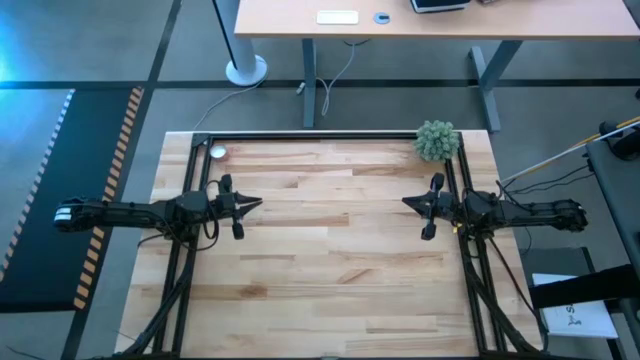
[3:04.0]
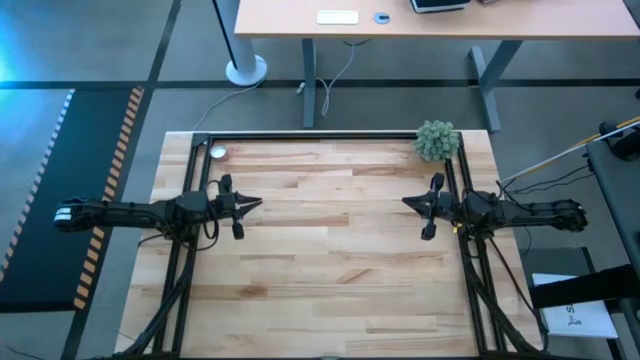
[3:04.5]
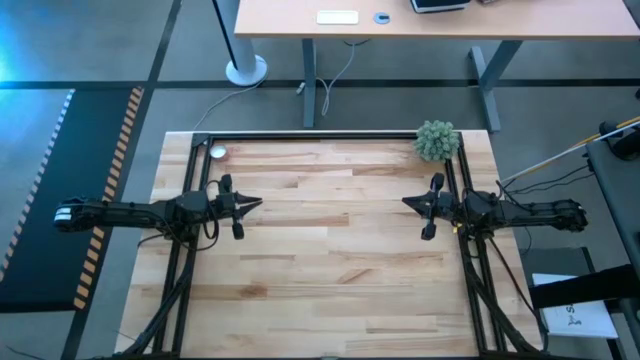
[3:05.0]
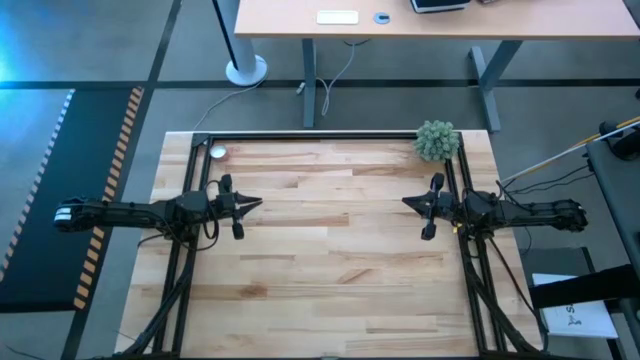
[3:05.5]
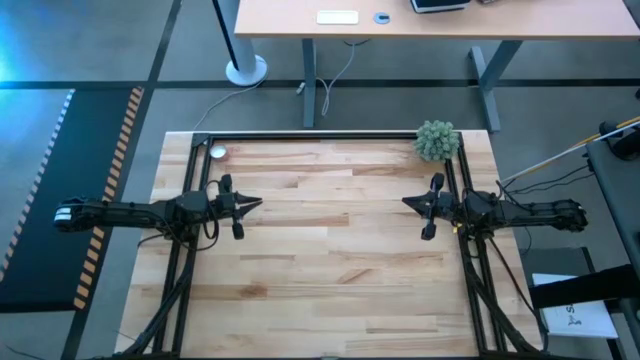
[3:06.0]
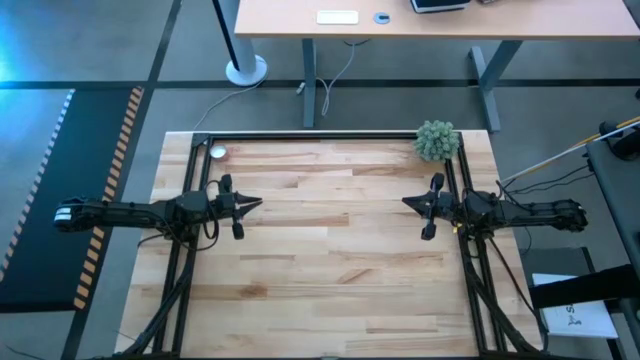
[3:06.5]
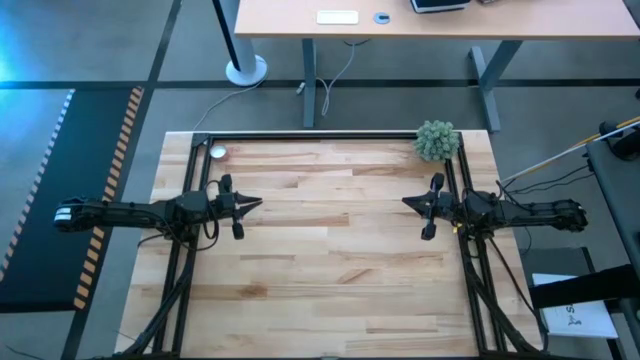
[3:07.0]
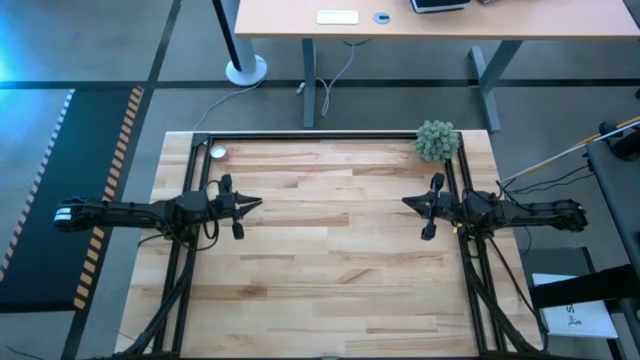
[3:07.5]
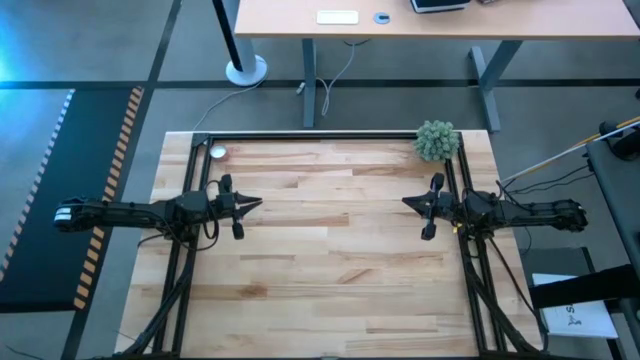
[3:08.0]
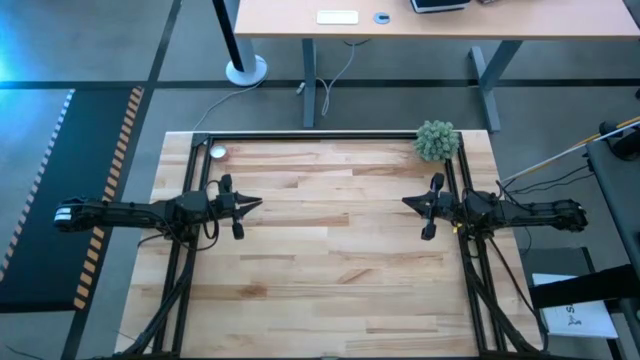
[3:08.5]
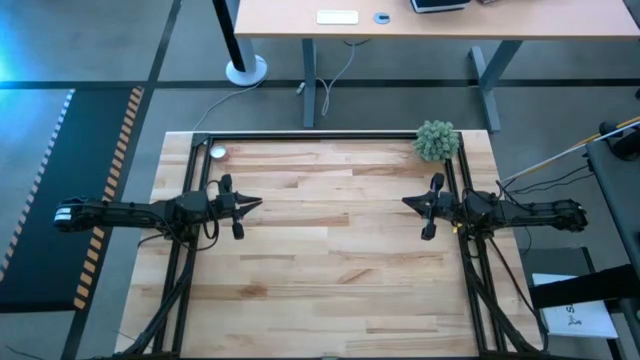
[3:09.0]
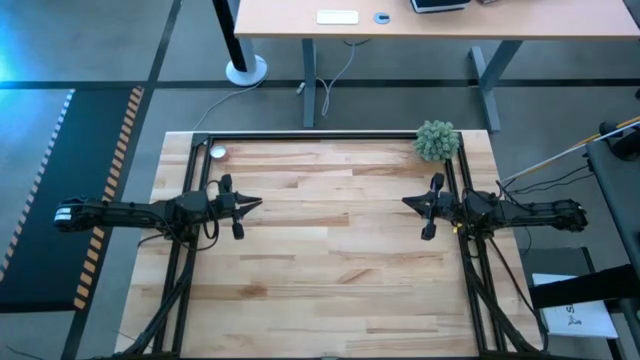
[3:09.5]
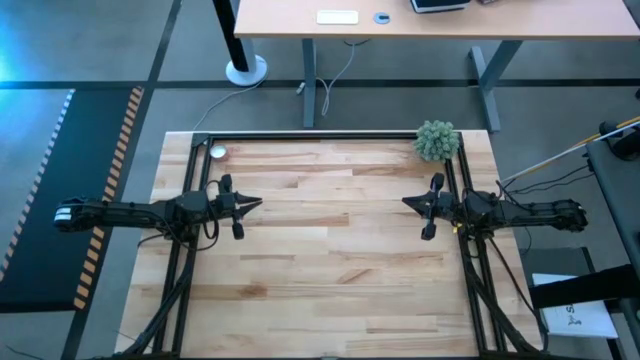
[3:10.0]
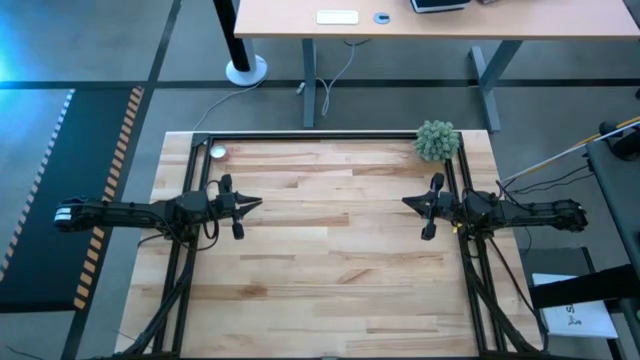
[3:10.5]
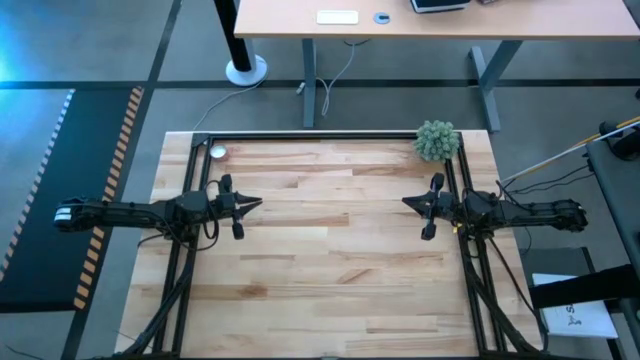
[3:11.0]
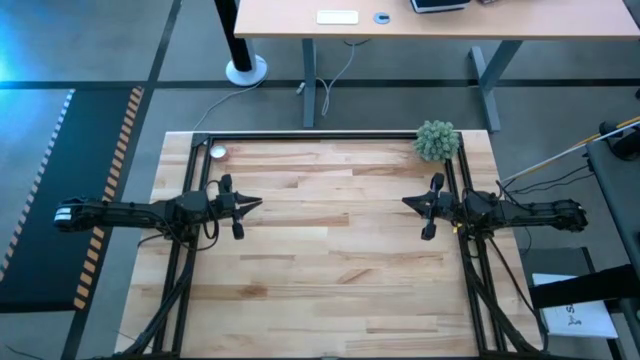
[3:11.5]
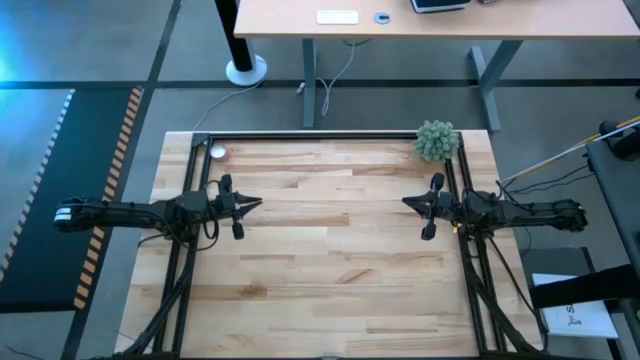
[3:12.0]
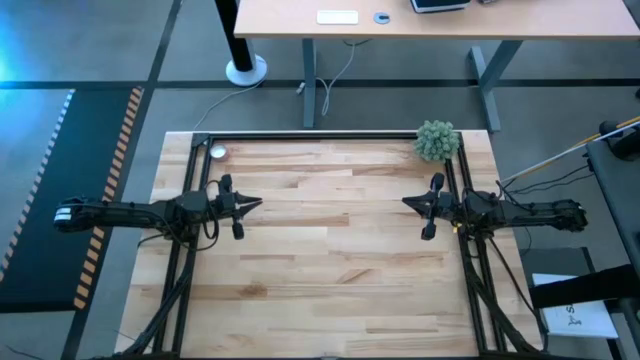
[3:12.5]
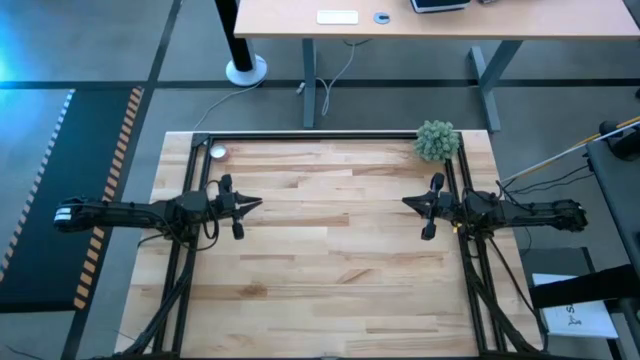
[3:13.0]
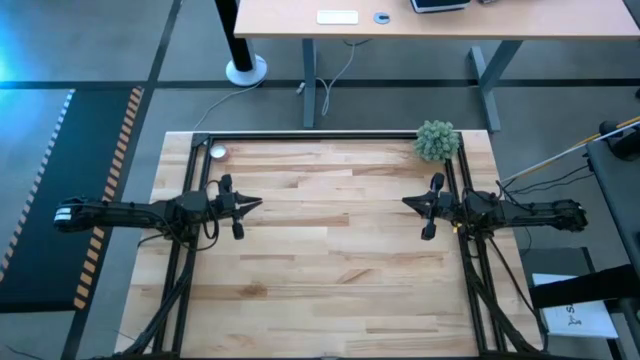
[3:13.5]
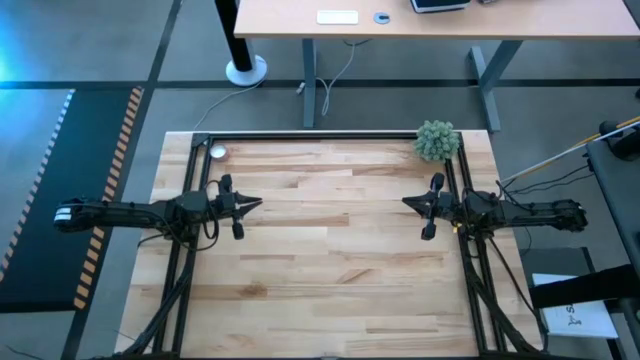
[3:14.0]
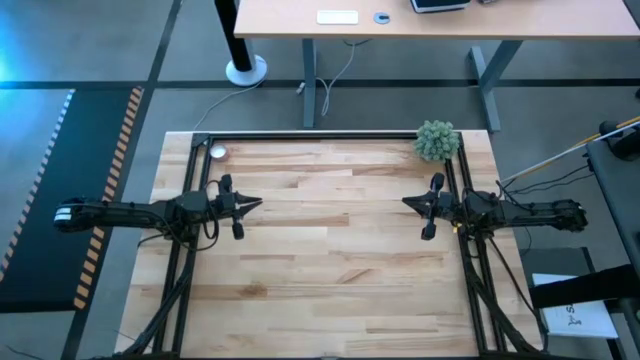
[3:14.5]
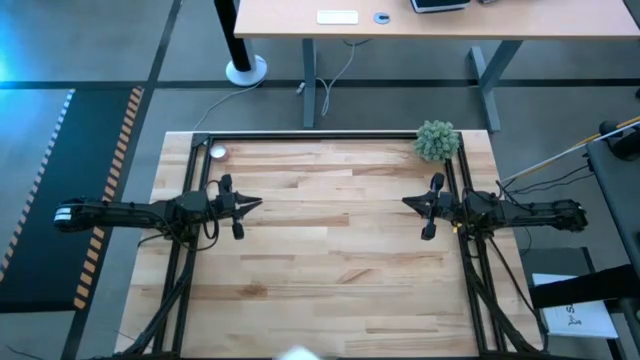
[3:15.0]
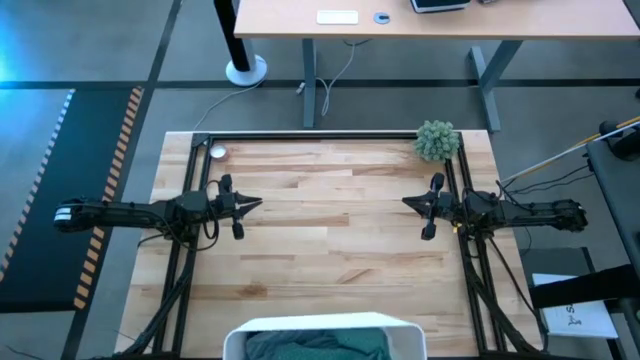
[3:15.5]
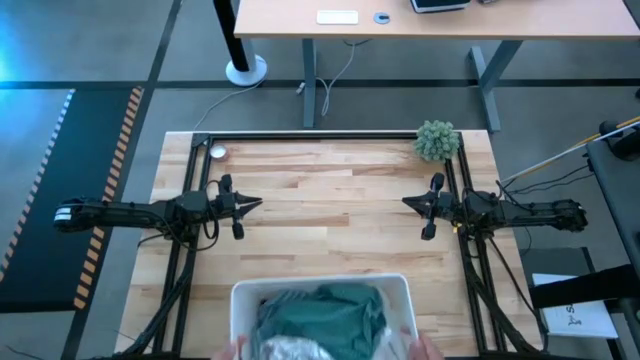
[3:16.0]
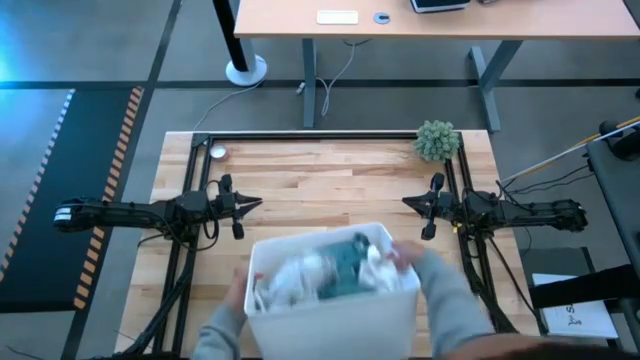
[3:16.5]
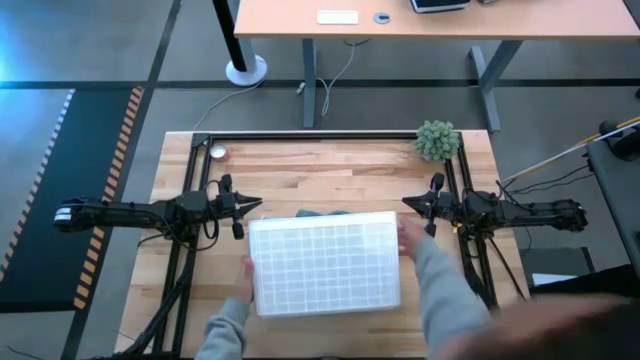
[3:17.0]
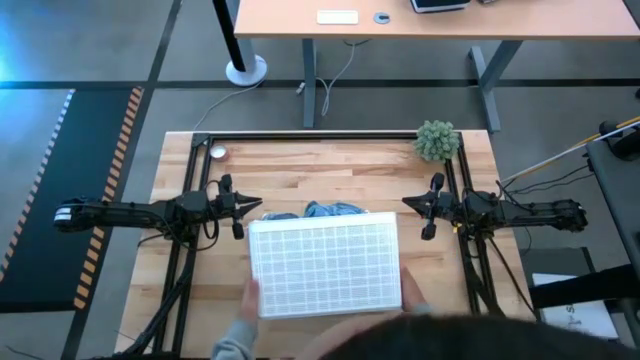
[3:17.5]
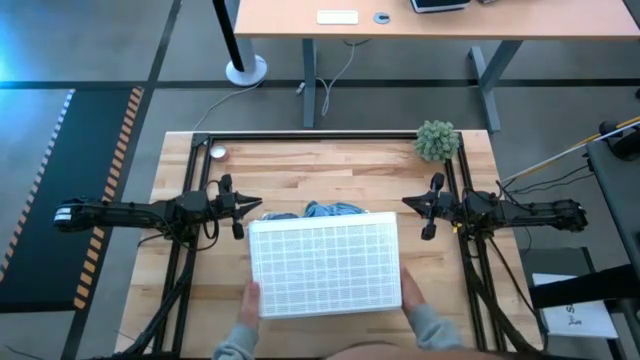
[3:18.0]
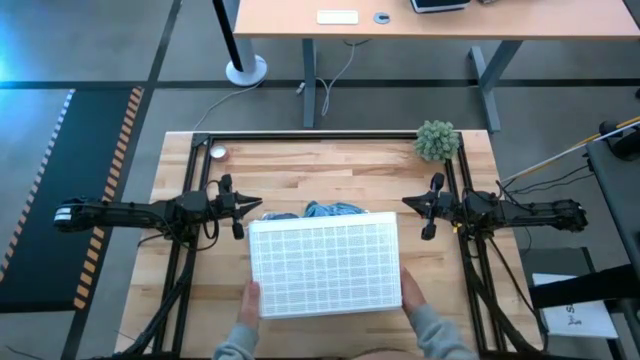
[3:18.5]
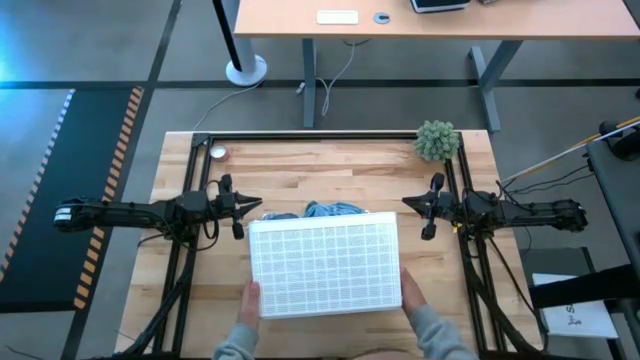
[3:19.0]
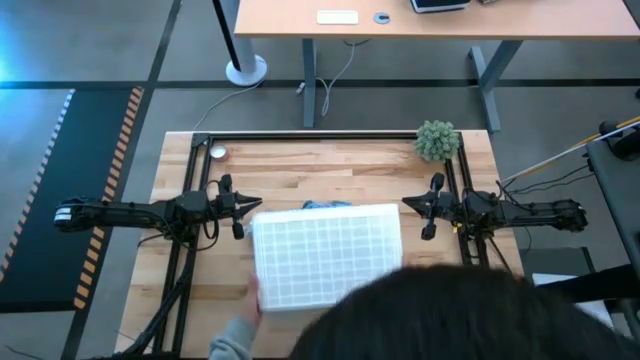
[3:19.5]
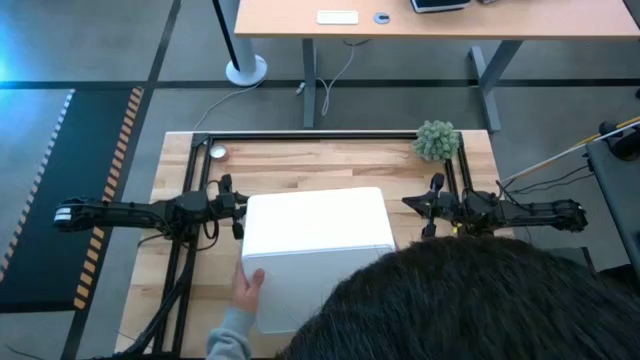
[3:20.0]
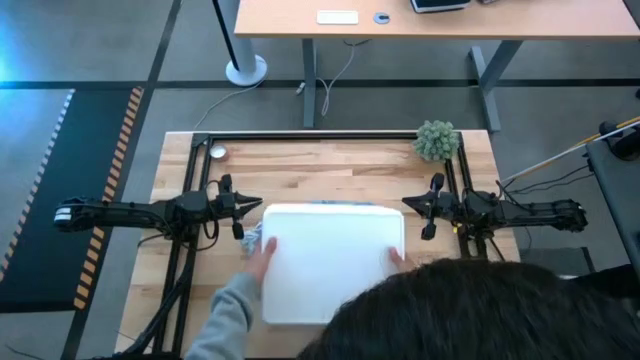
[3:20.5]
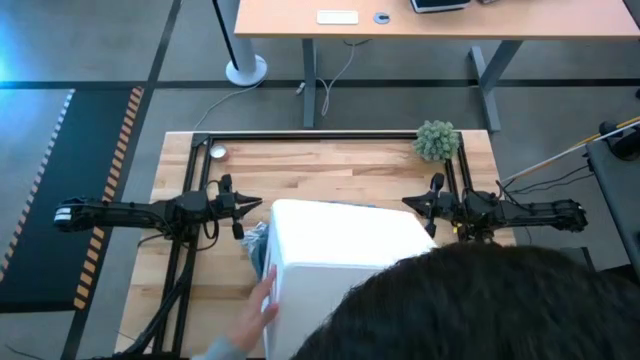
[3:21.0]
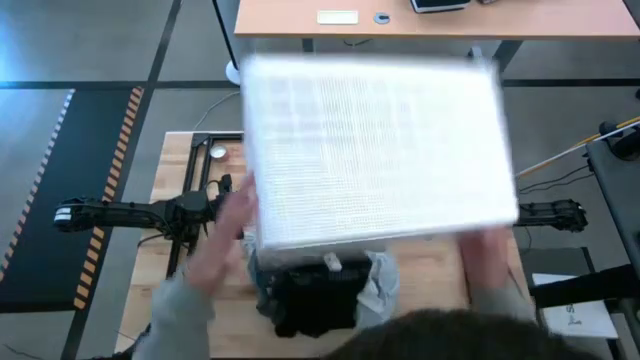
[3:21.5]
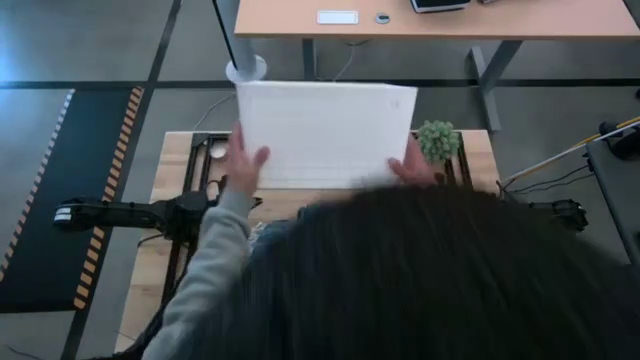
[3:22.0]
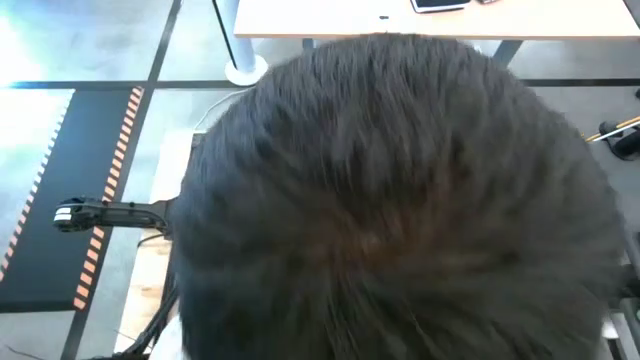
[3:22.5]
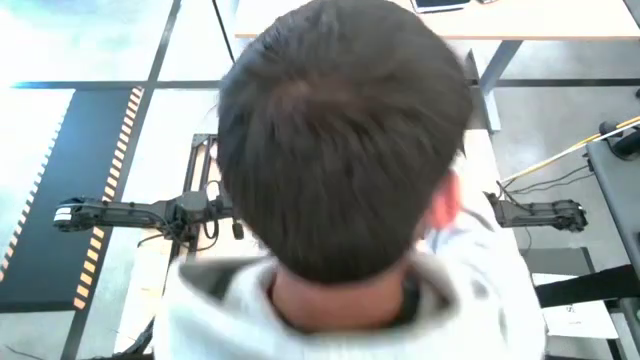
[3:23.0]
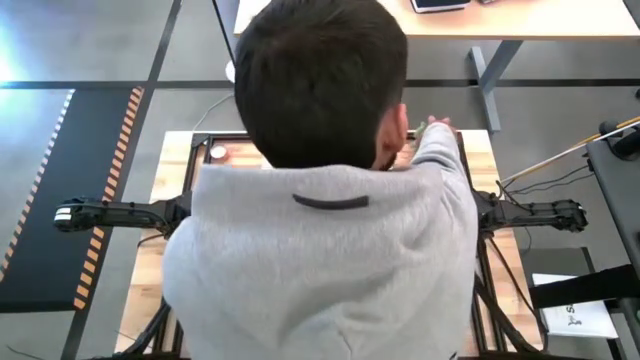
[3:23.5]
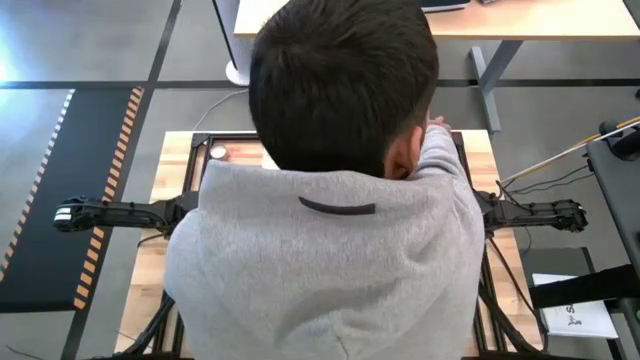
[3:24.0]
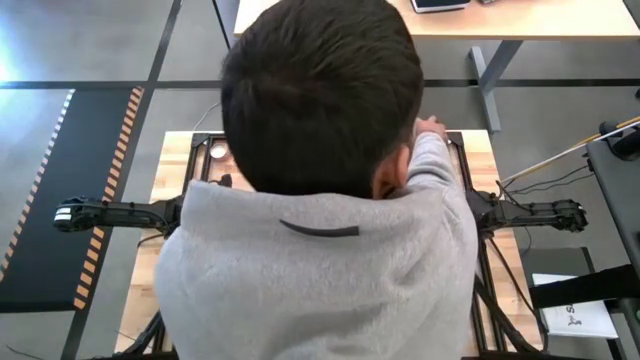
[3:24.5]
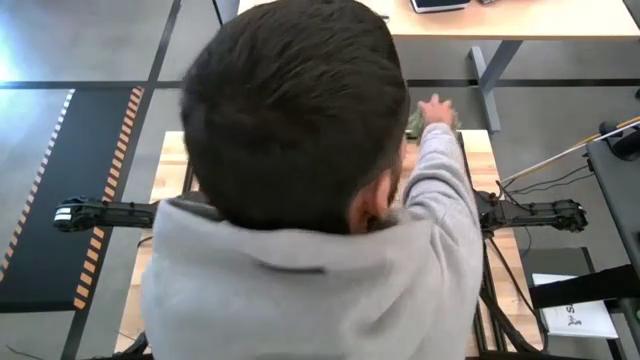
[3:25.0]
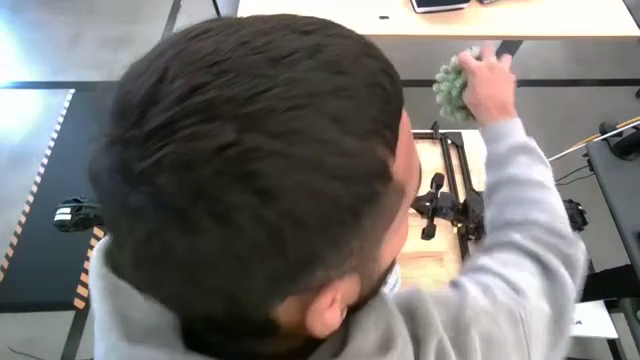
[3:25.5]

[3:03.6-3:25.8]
Task: Sort clothes
Return to Home Position
